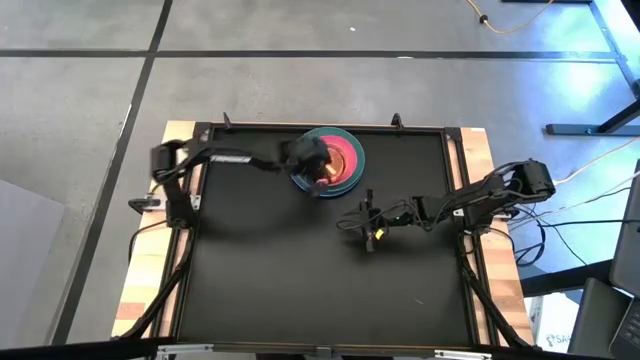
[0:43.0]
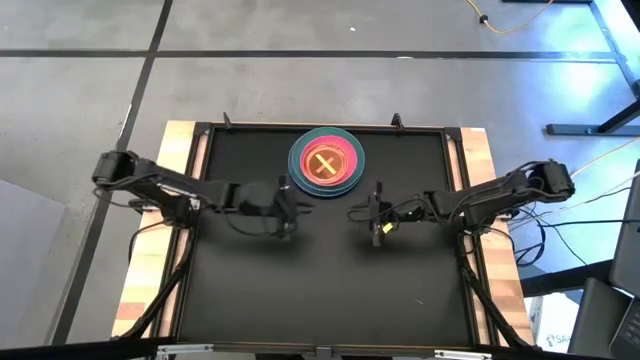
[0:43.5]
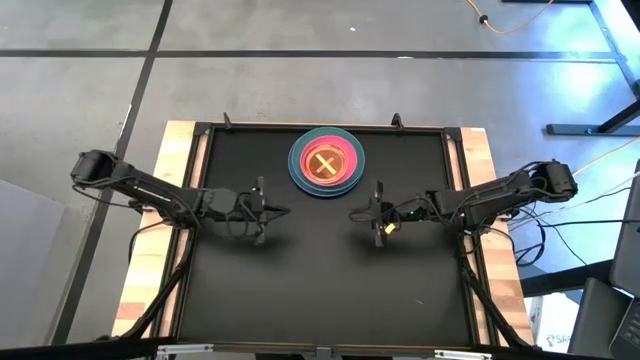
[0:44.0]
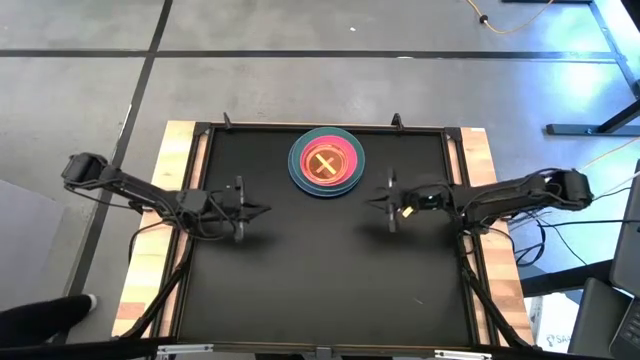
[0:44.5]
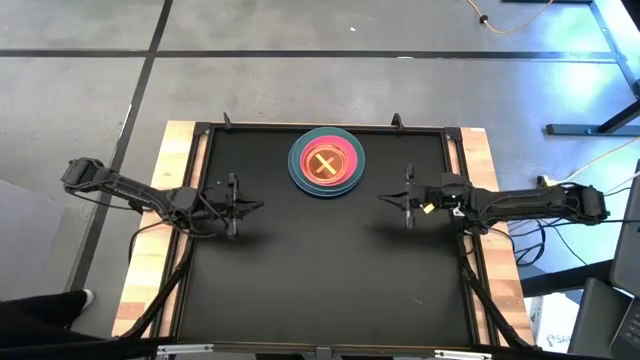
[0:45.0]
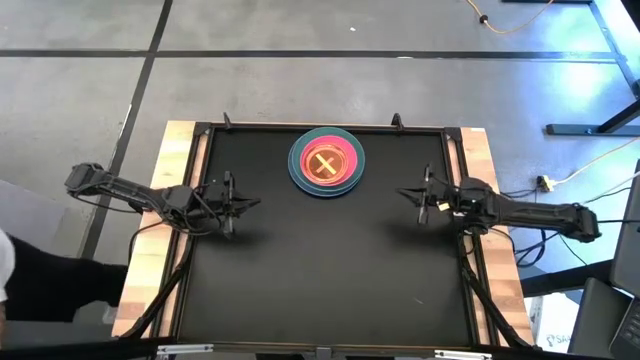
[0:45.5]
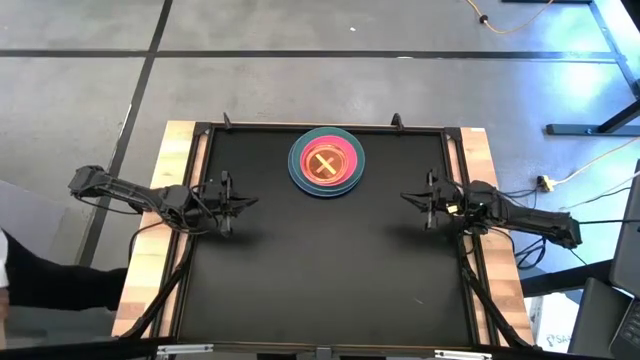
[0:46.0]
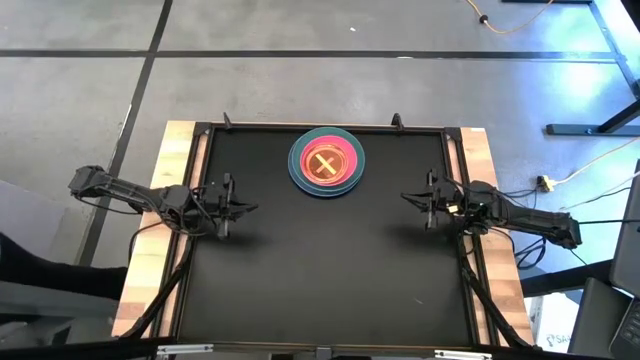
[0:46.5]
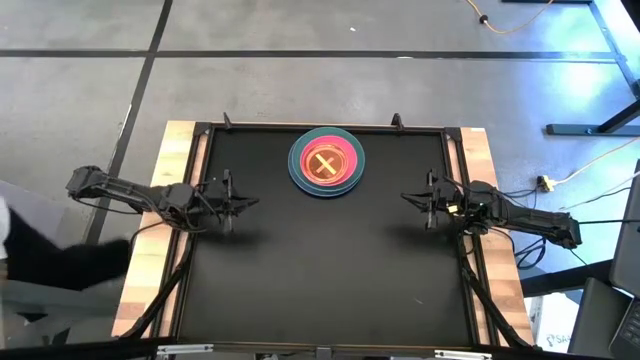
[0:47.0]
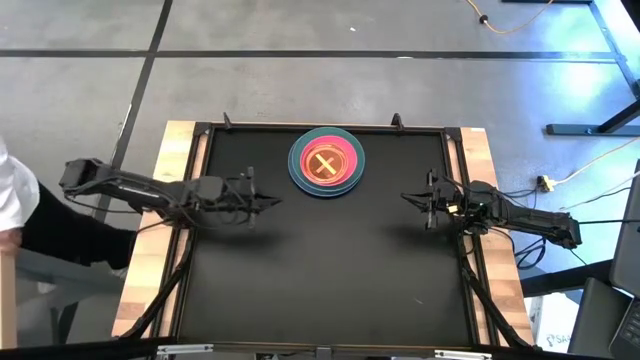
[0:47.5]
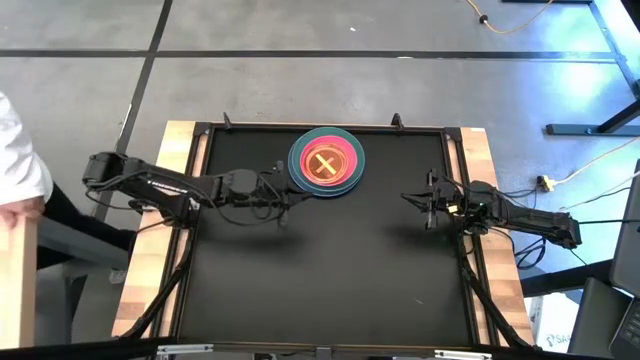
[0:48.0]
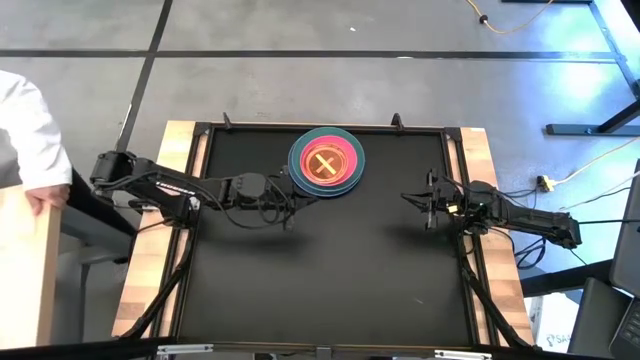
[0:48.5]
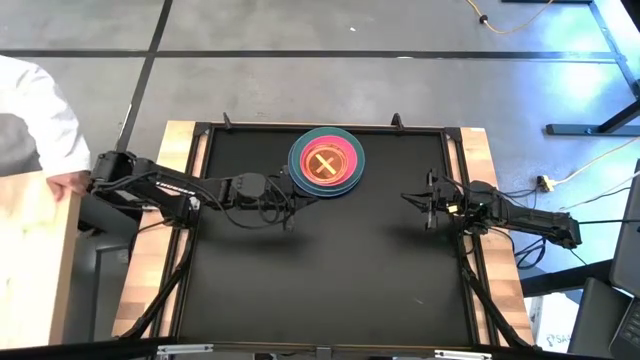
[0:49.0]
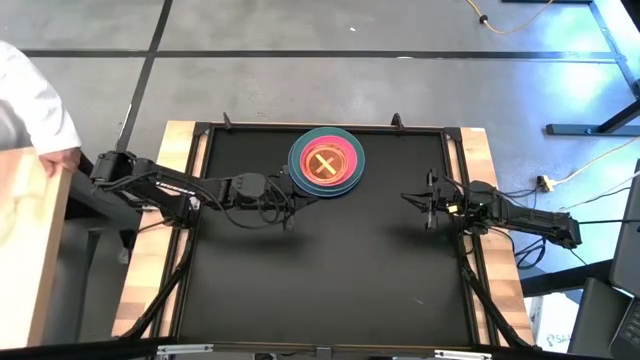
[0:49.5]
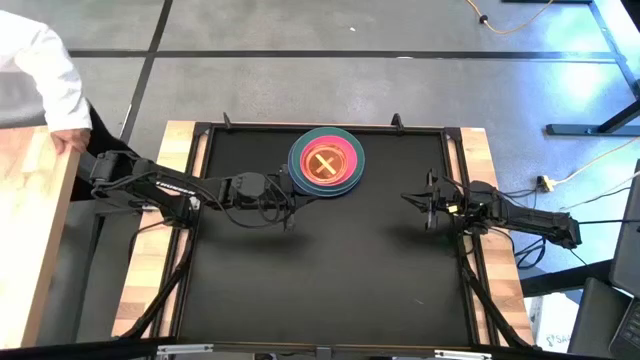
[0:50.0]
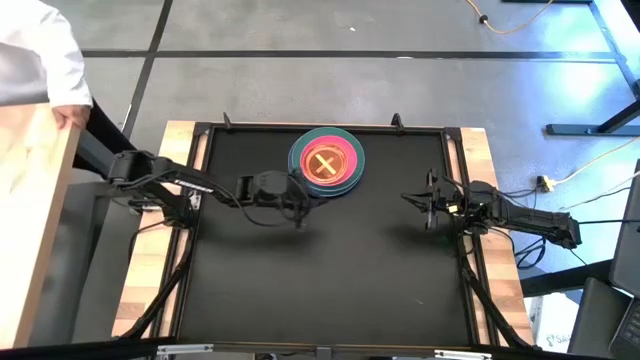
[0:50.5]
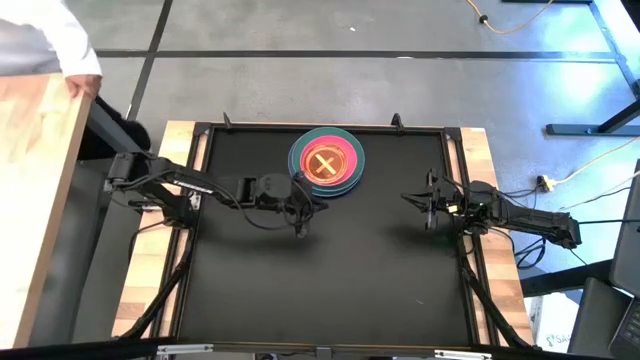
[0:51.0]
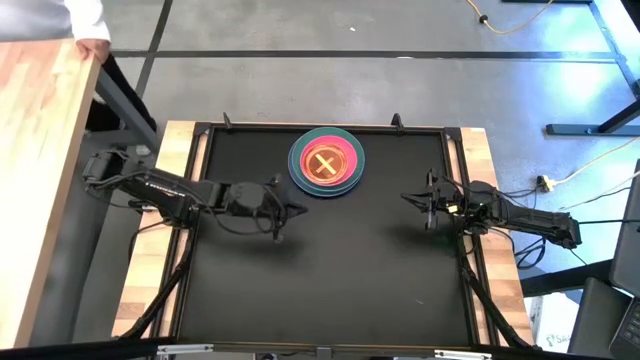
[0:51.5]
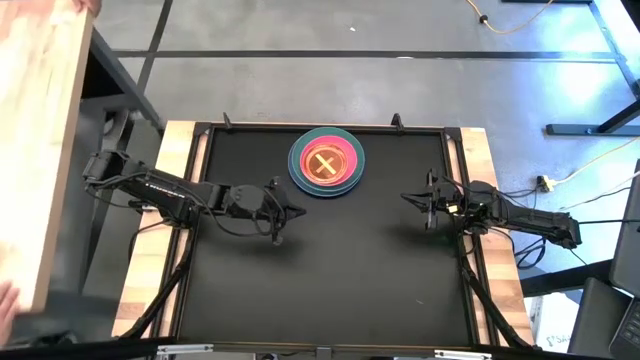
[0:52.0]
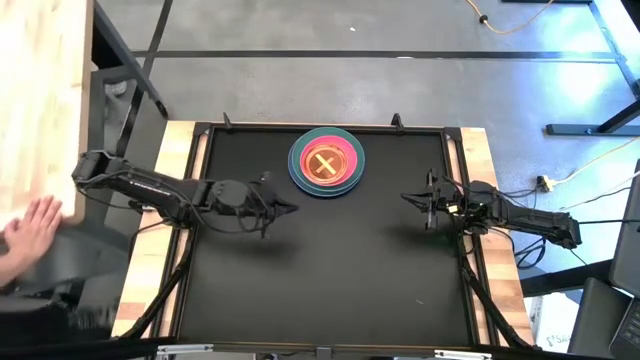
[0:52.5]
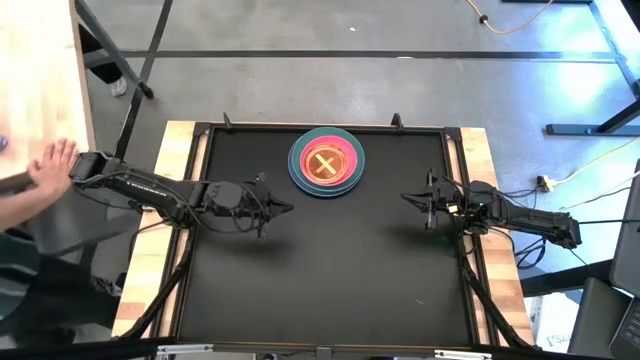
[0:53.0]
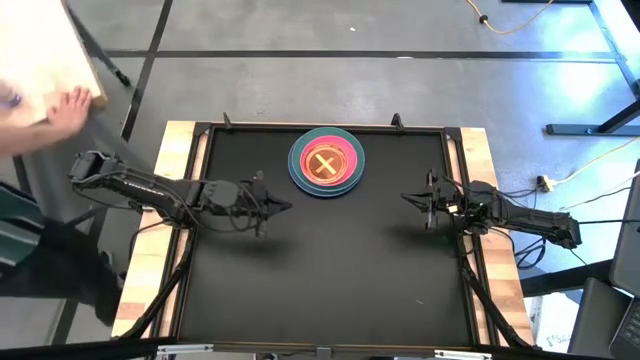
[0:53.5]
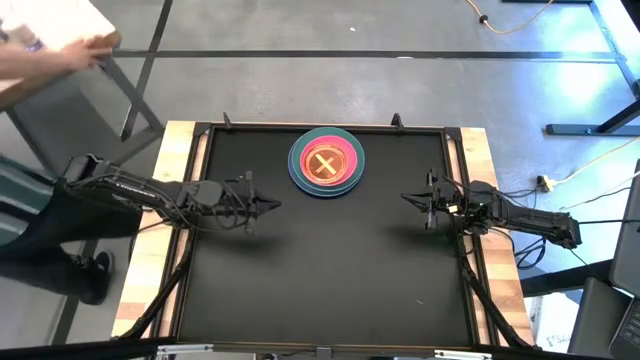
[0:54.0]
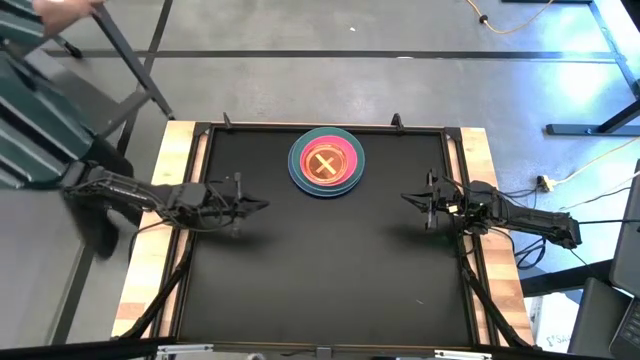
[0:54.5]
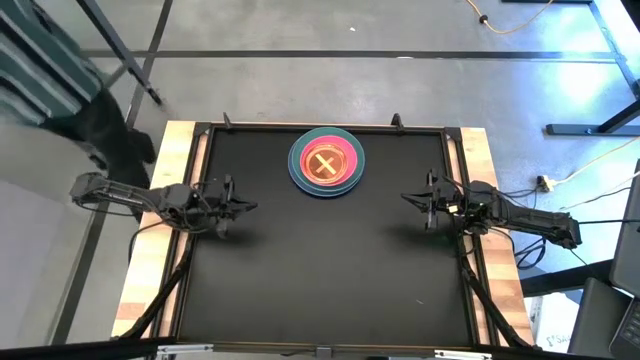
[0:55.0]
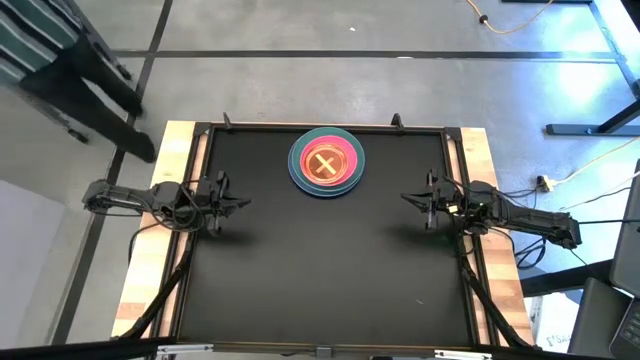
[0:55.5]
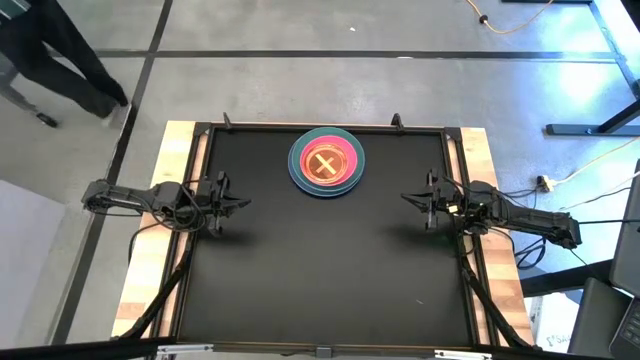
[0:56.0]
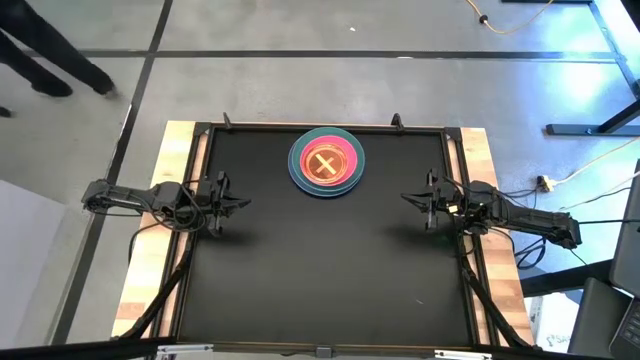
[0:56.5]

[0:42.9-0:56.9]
Task: Stack plastic plates
Return to Home Position

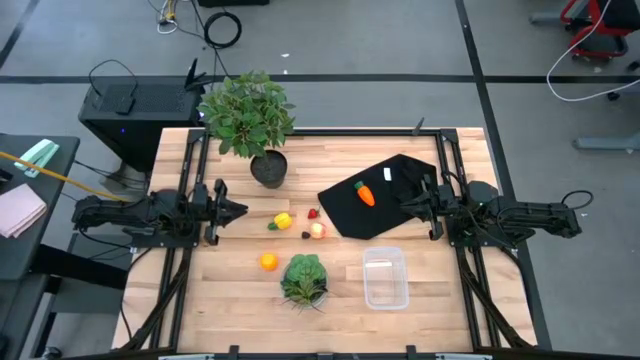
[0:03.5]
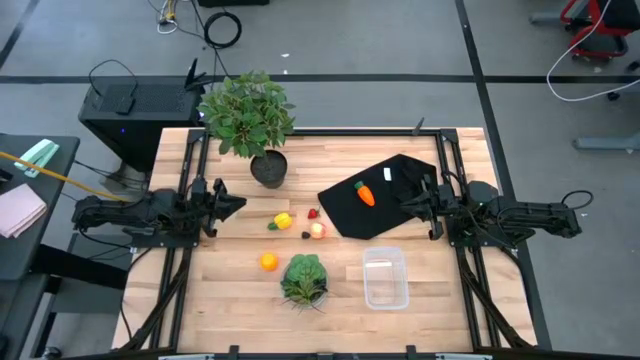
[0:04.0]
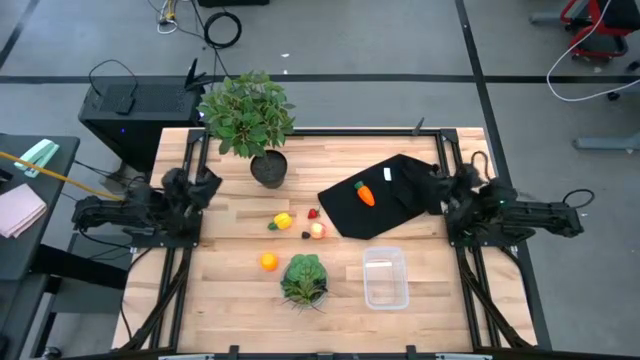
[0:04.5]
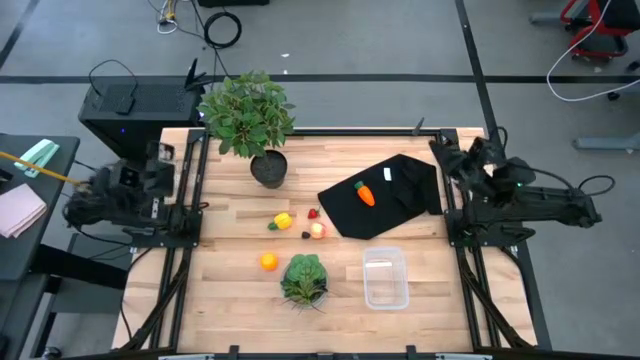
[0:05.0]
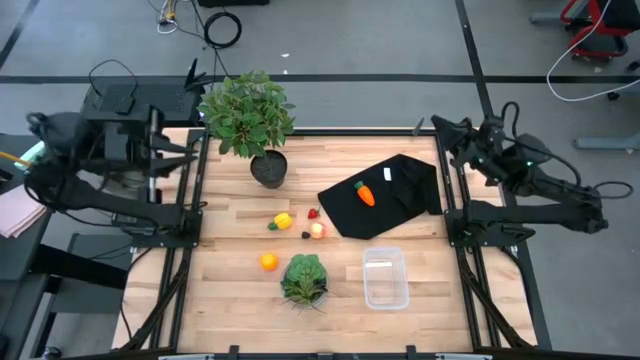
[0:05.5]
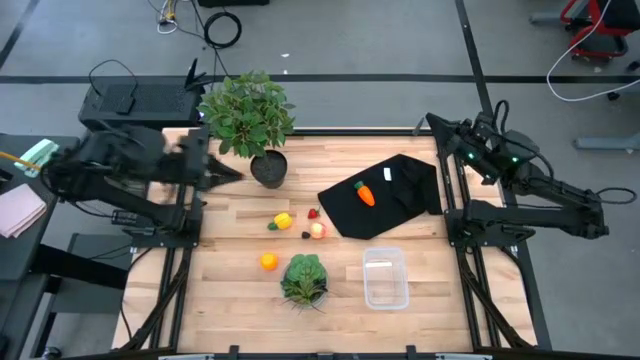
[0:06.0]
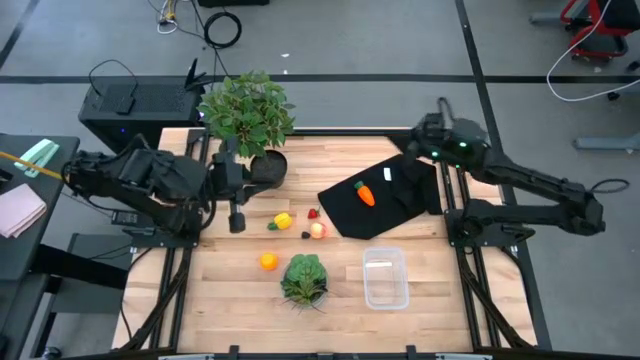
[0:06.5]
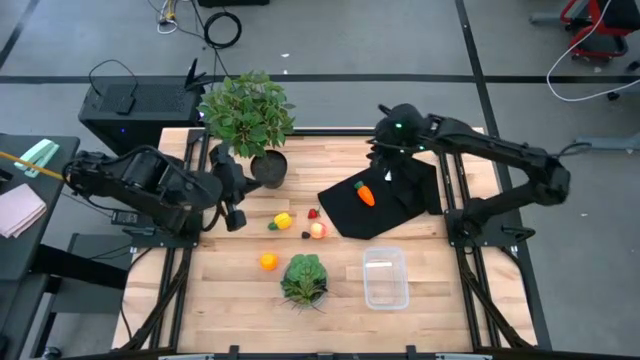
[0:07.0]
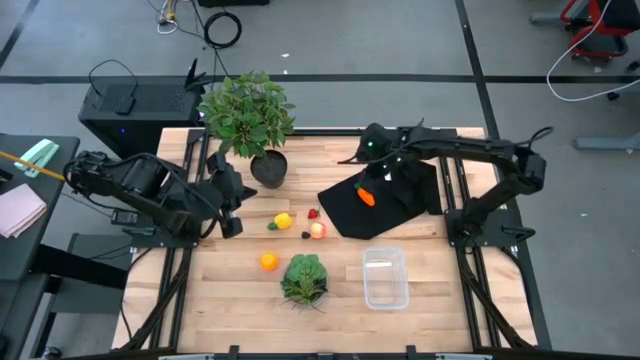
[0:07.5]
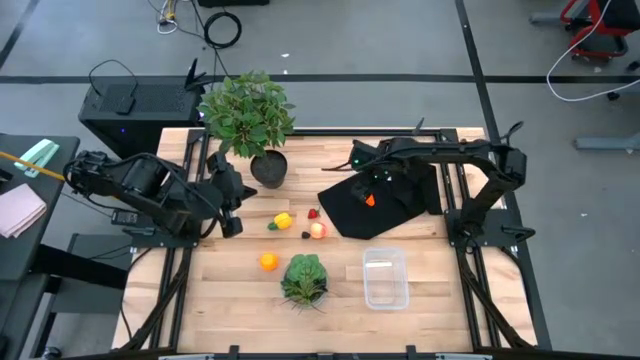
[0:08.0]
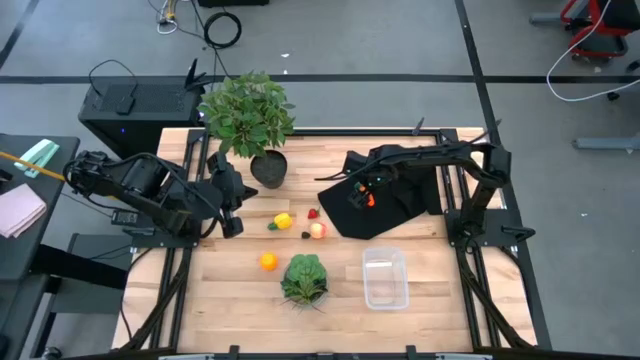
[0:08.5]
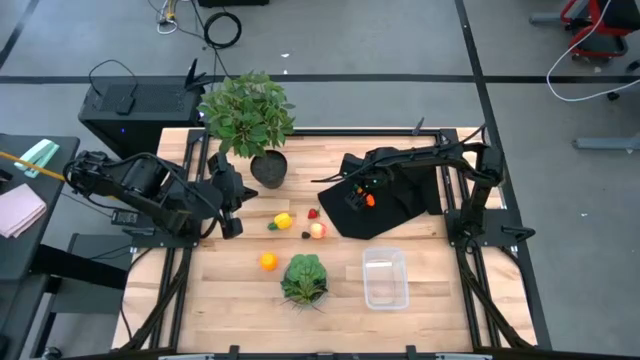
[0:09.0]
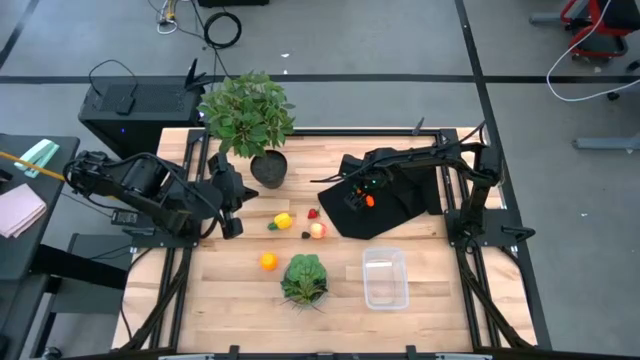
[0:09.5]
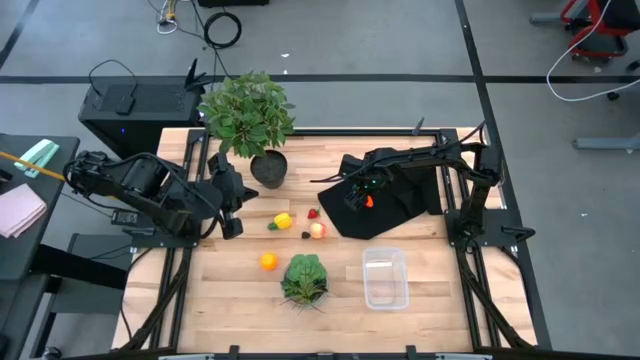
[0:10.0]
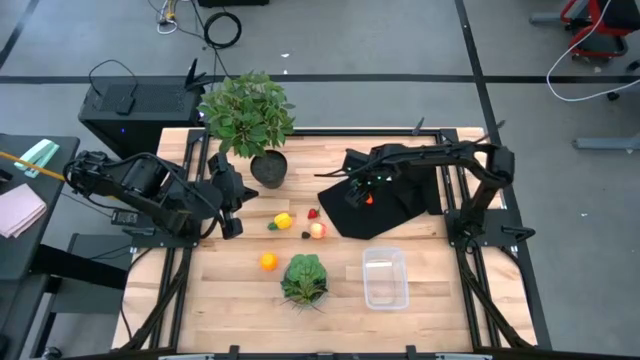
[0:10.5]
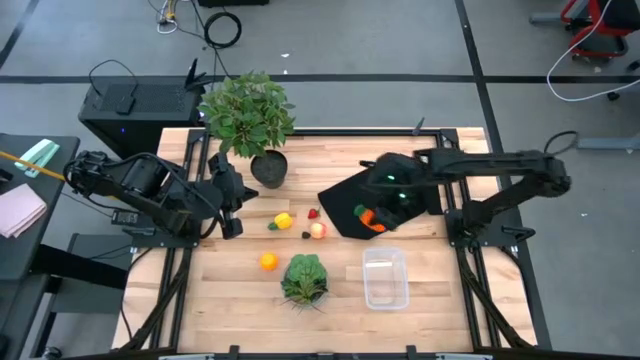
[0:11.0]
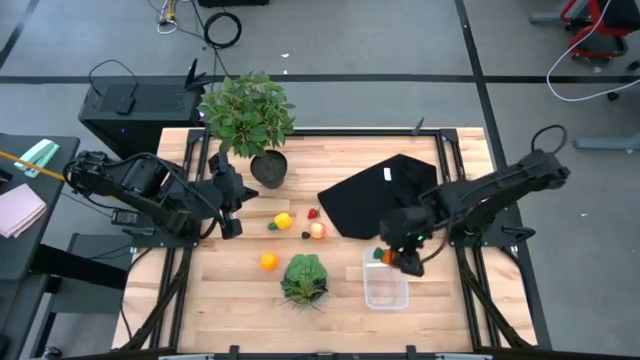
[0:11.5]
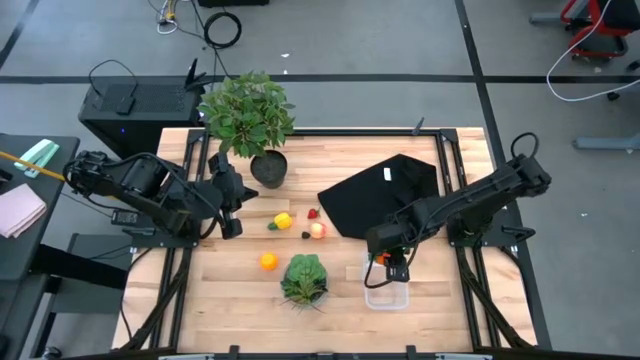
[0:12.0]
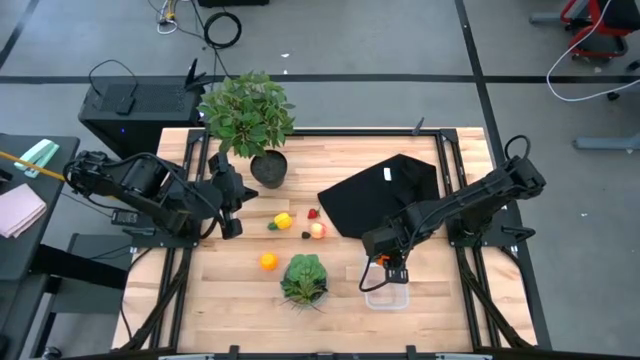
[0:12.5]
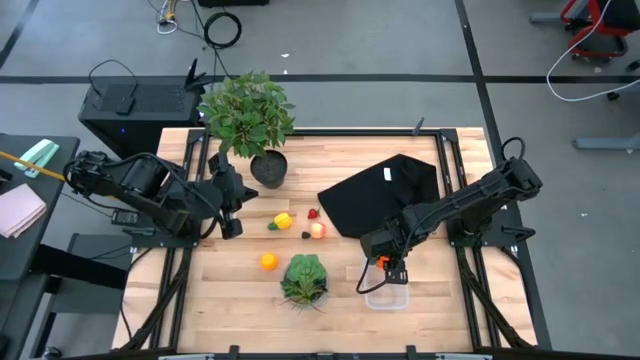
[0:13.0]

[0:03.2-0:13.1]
Task: Pick and placing Produce into tupperware
Put the carrot into the transparent bin
